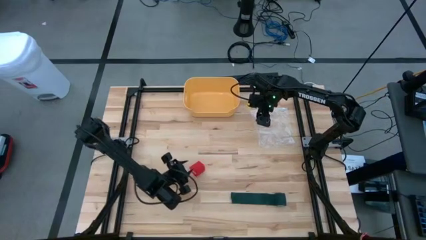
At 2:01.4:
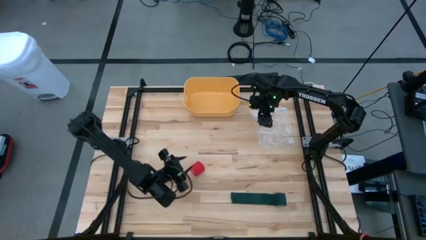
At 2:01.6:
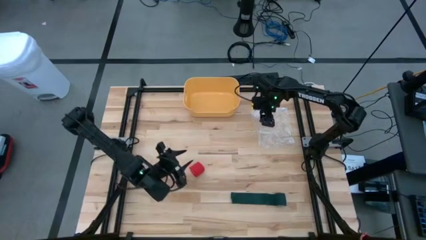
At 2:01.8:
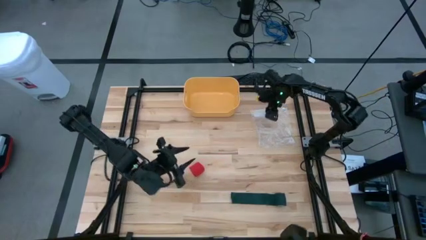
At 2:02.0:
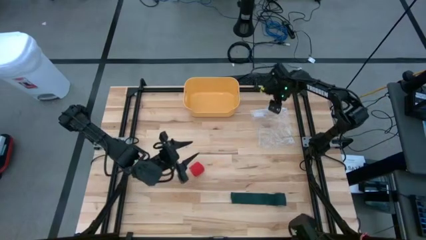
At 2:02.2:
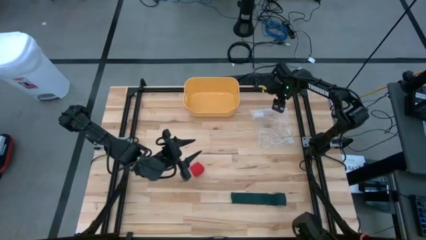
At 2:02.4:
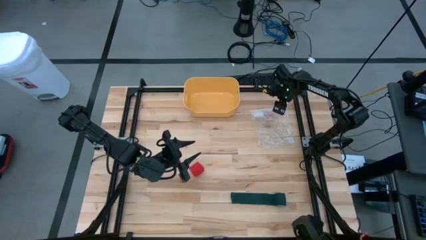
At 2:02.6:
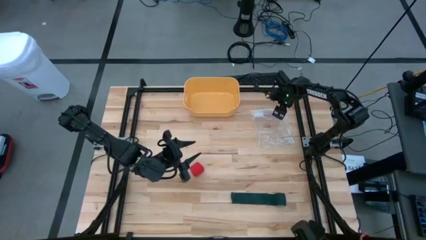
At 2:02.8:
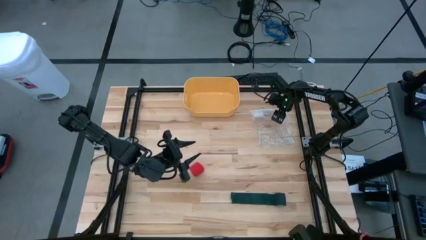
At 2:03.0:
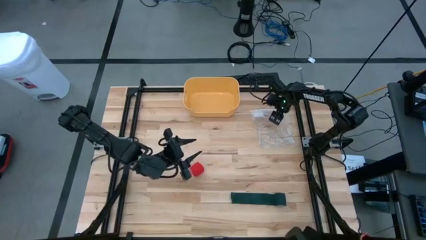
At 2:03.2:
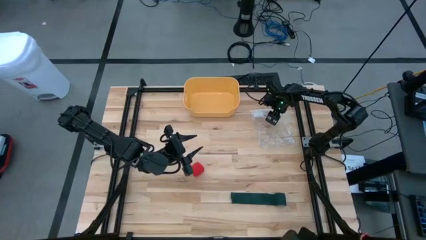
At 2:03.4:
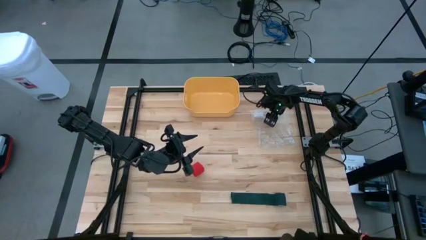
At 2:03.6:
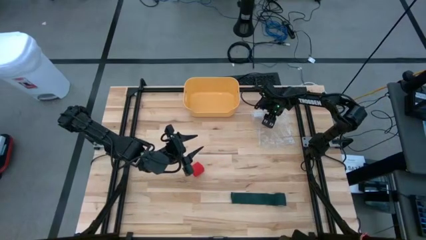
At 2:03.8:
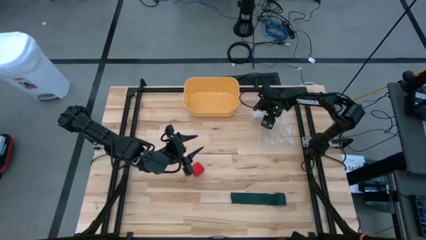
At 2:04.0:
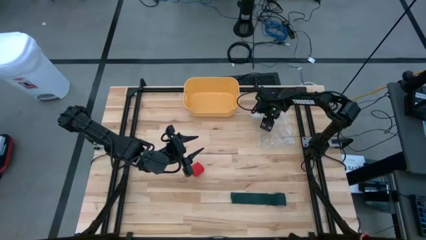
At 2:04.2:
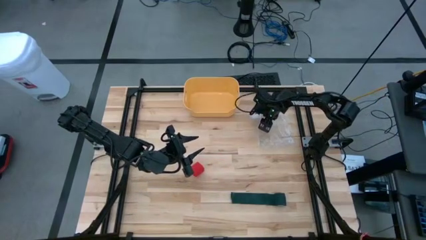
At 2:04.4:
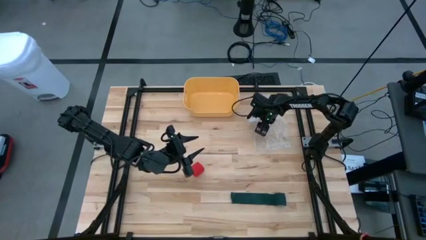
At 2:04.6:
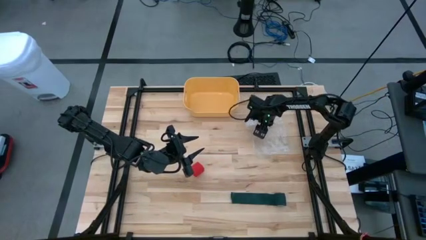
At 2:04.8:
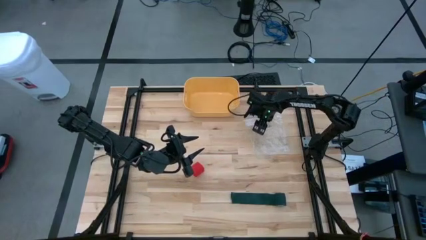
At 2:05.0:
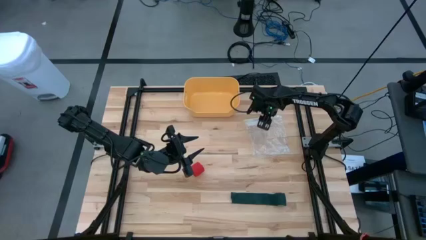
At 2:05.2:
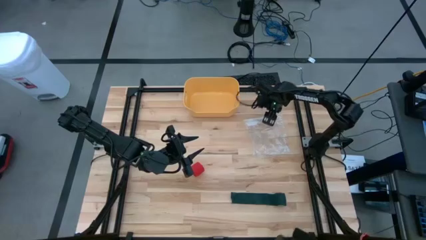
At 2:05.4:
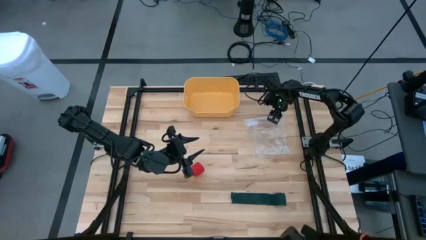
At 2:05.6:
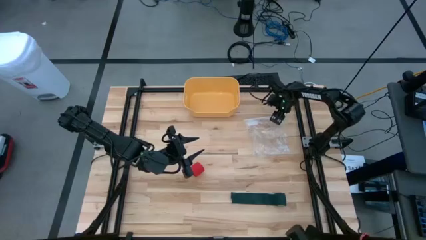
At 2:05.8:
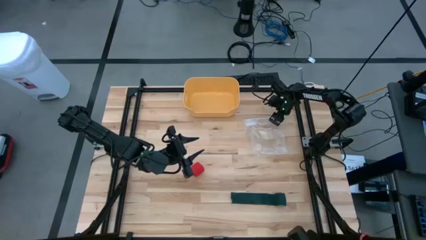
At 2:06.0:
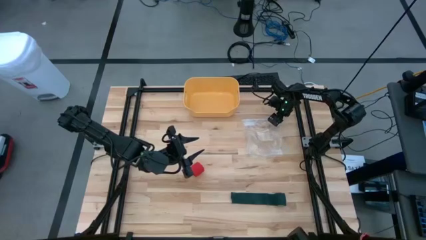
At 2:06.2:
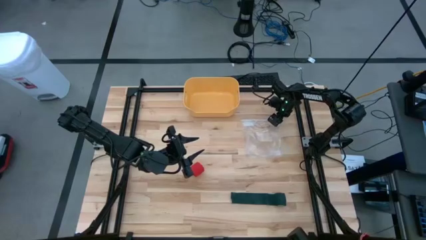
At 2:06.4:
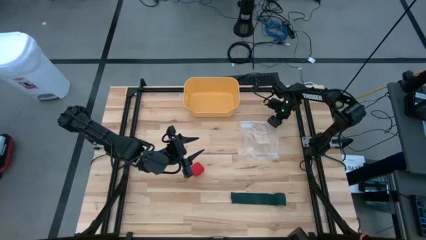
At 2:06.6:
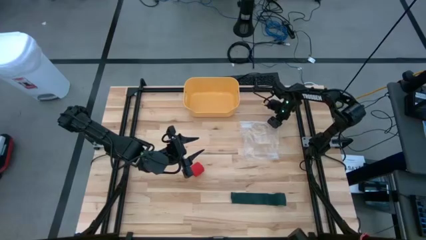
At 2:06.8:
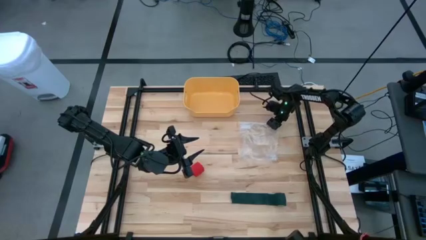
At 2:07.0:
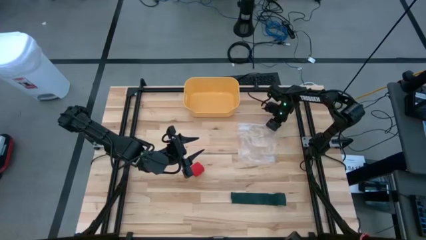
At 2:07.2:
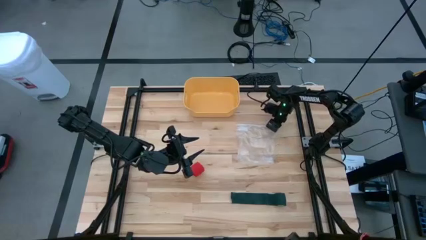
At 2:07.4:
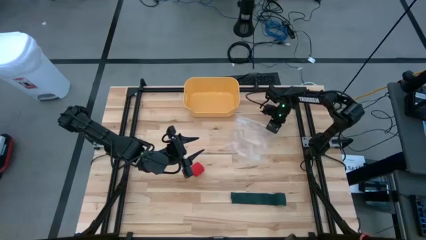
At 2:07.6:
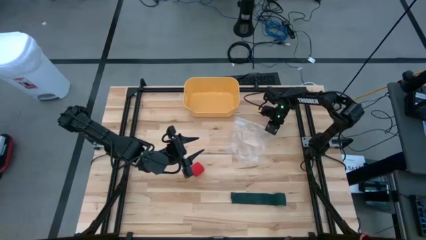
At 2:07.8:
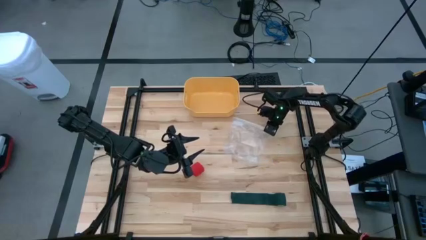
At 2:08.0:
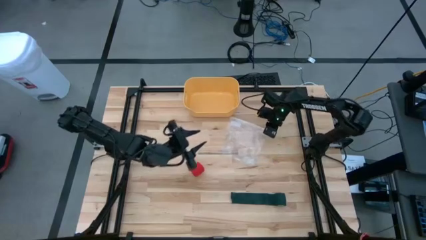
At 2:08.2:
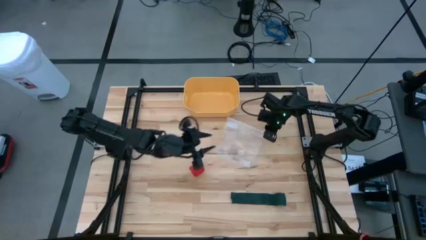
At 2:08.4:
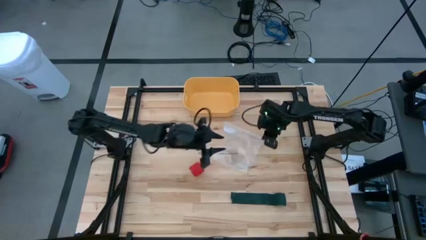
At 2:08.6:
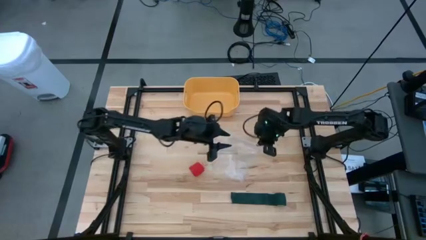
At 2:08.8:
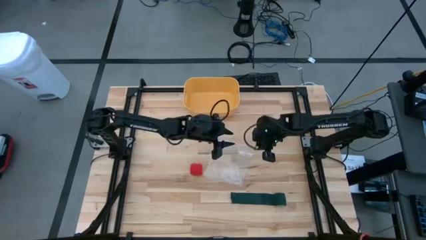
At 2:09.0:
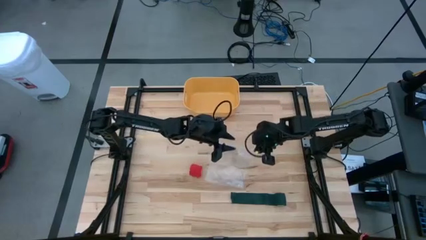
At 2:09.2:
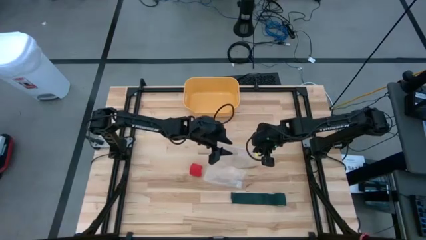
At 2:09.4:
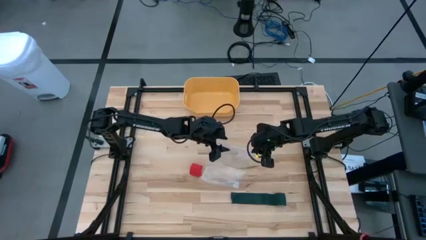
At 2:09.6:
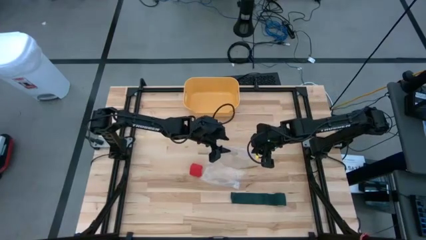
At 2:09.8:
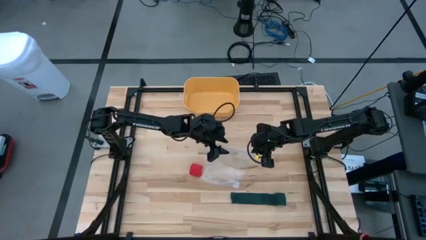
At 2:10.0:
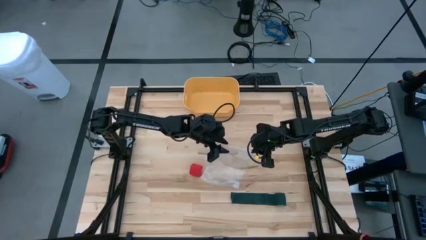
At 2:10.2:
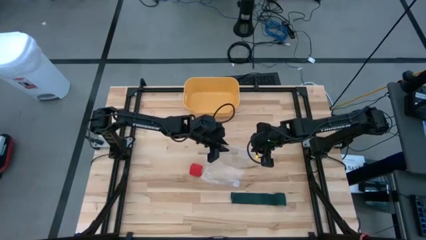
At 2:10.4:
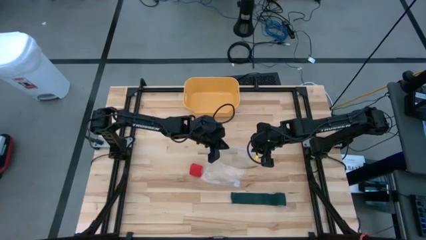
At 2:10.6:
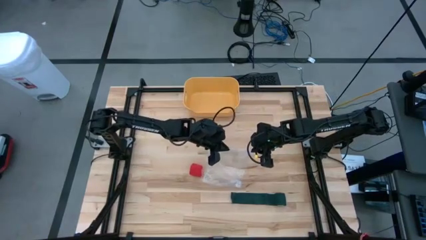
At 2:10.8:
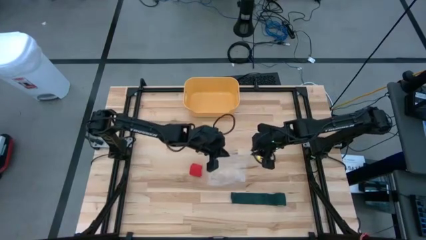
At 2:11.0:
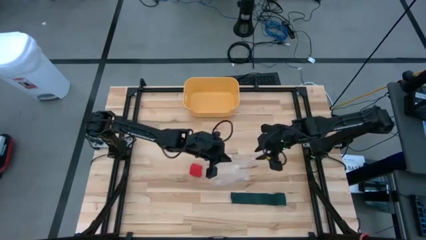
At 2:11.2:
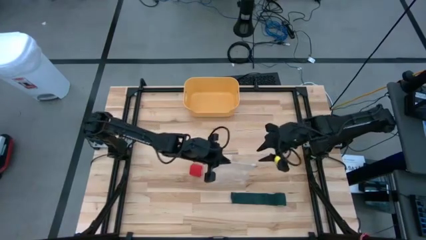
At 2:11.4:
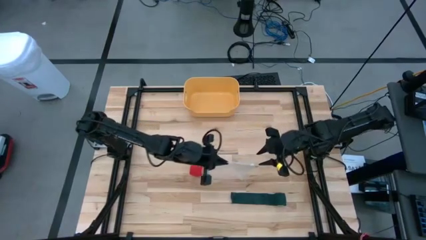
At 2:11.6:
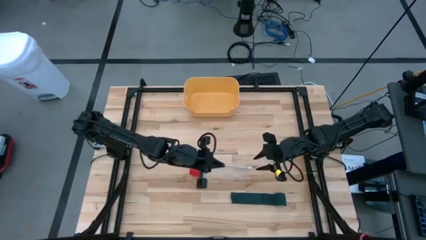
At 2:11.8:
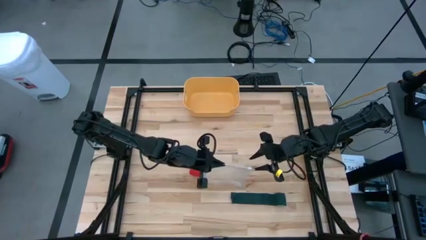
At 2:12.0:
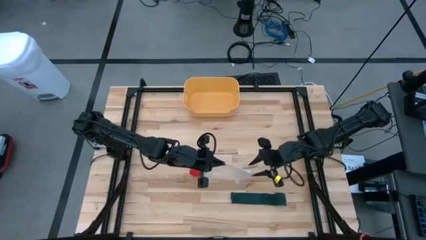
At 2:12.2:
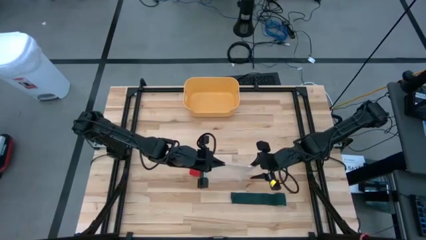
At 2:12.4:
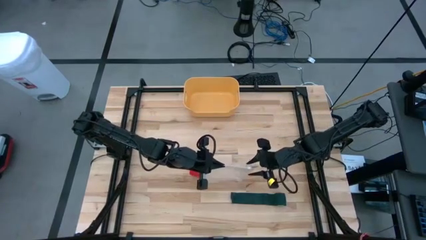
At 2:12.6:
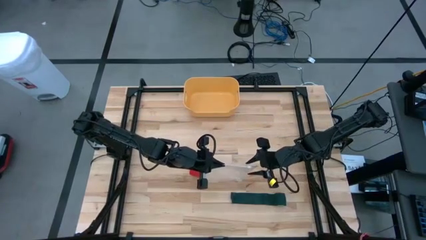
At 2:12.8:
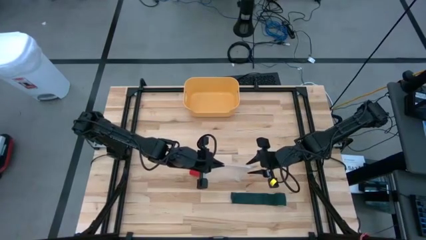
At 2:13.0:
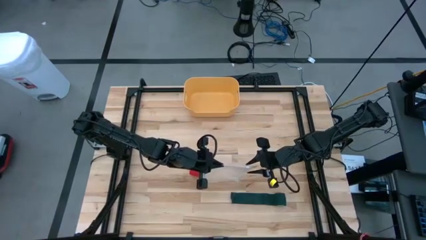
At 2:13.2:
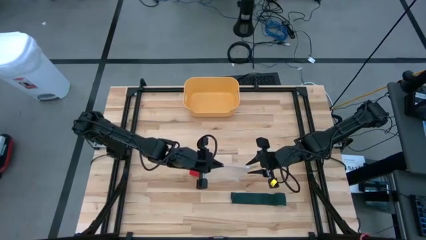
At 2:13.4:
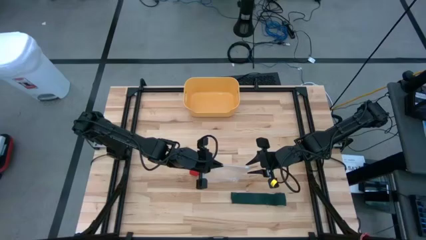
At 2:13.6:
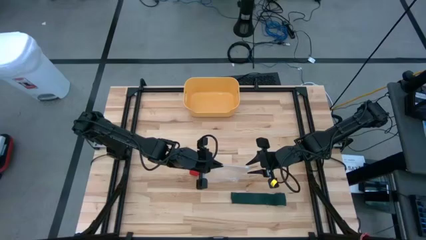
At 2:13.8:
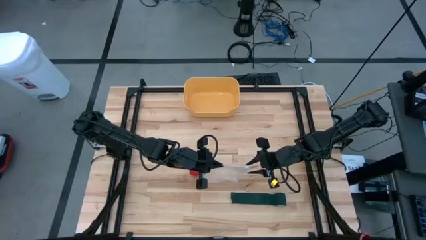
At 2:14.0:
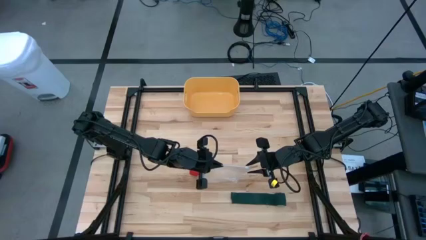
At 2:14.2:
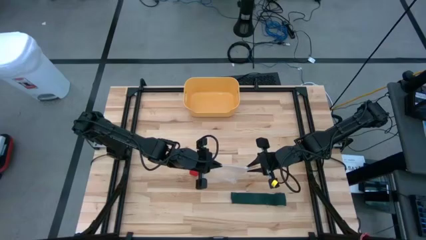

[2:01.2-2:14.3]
Task: Roll bandage
Open the transparent zip bag

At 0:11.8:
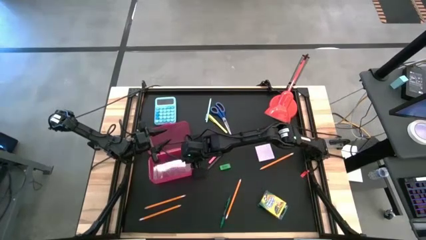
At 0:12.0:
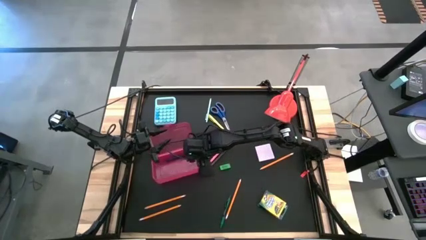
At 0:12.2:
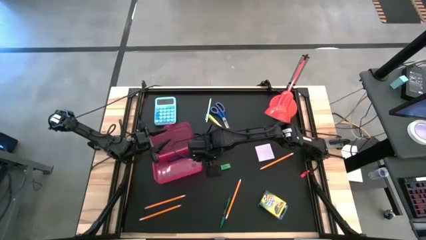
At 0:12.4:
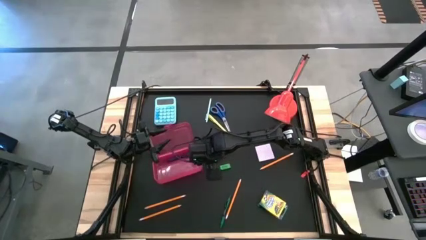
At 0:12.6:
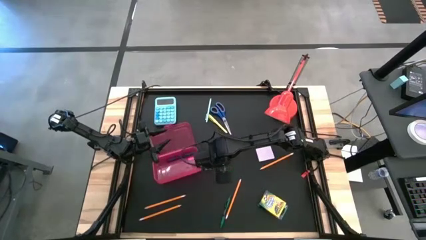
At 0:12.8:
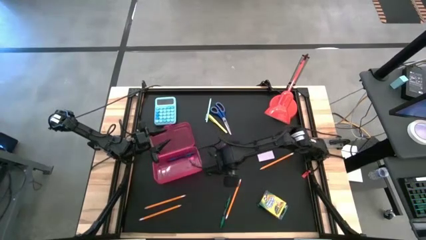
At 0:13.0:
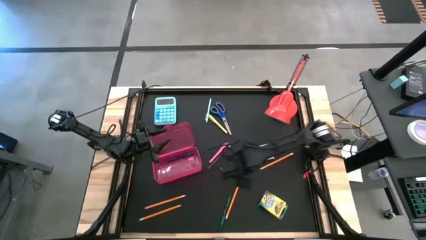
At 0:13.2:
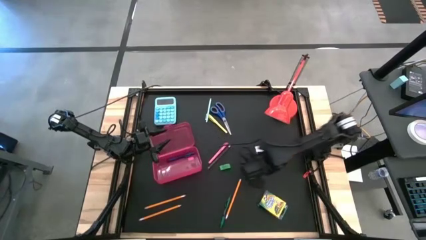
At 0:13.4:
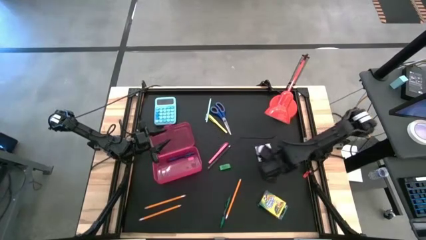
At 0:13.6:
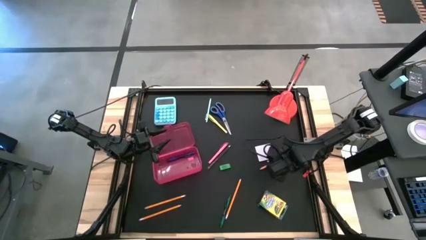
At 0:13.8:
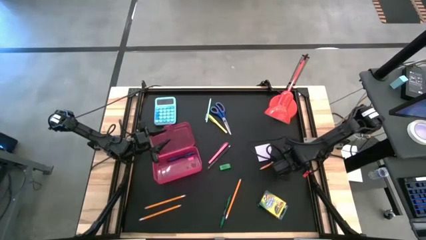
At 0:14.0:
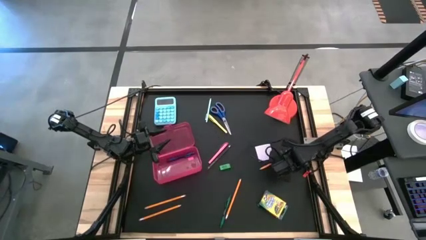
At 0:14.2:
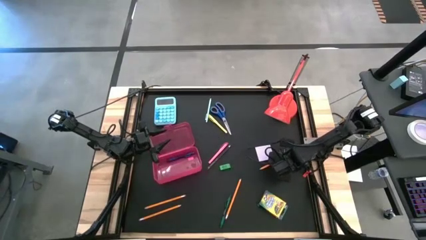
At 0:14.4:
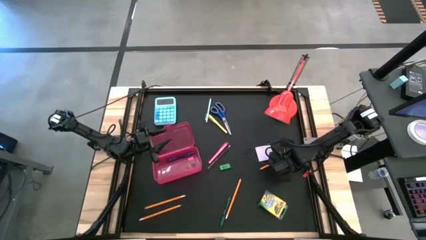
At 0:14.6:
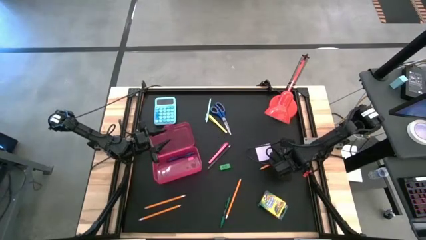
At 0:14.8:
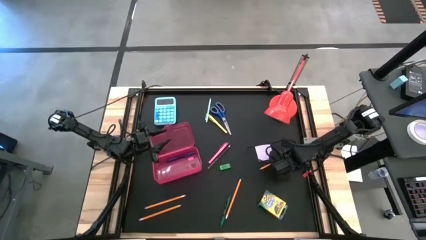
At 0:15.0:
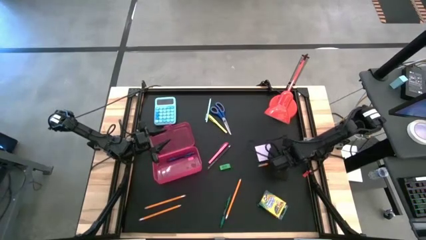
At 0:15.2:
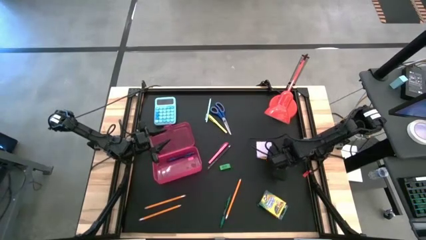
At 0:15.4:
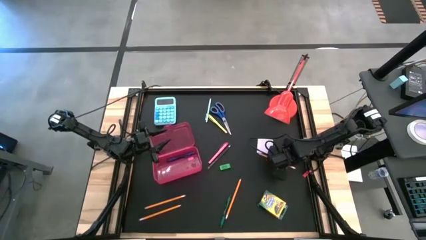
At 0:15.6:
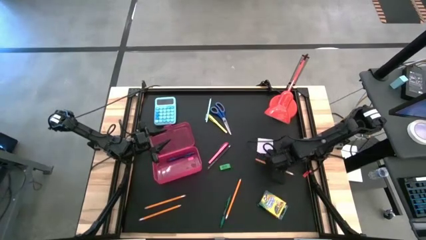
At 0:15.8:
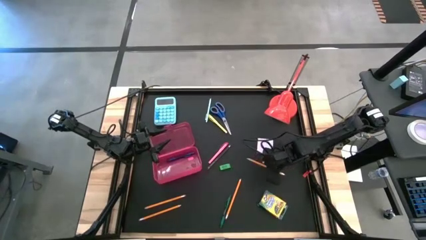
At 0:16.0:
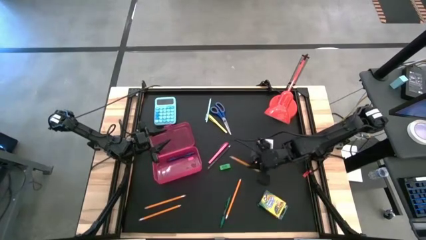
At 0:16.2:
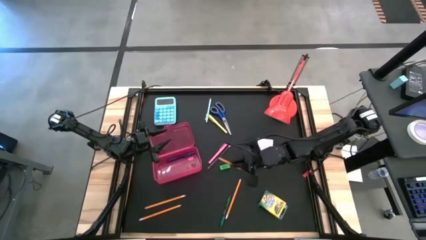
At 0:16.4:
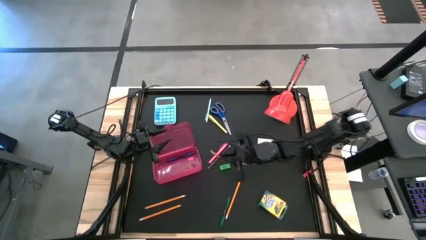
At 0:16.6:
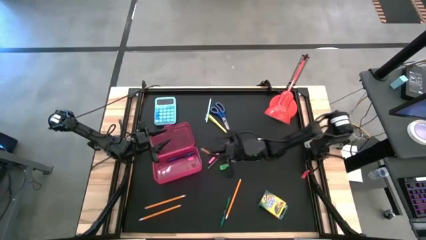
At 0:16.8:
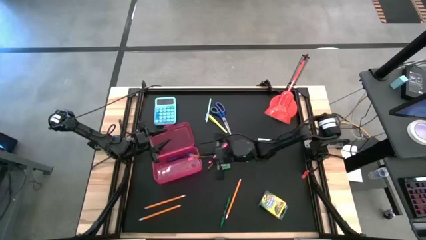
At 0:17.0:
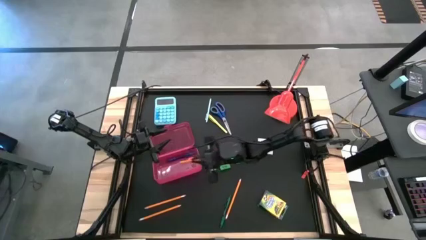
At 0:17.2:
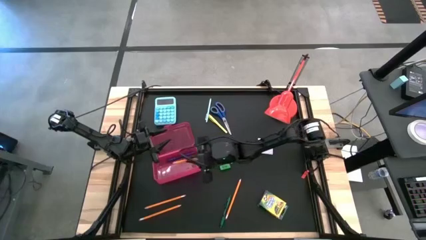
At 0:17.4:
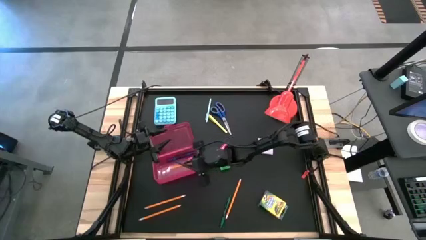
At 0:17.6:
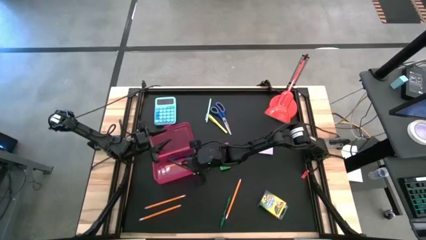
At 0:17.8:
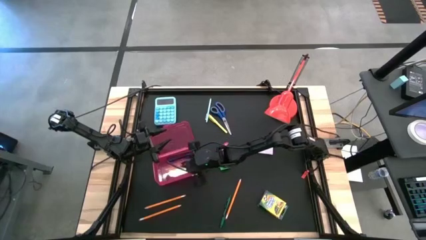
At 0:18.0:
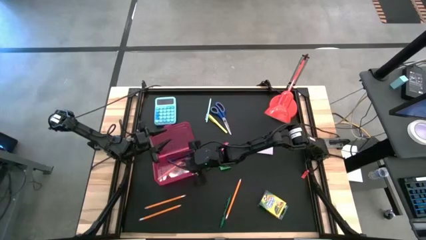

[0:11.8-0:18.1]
Task: Pack school essentials
Put the yellow pencil into the pink supply box
